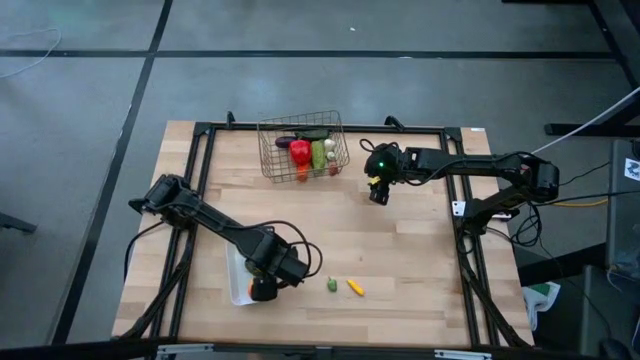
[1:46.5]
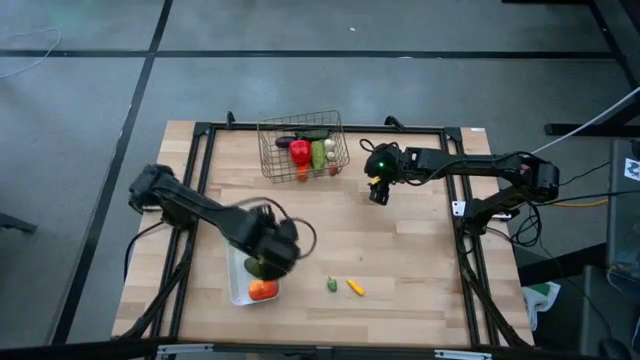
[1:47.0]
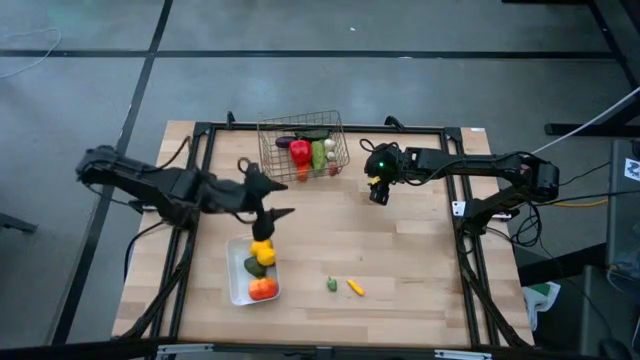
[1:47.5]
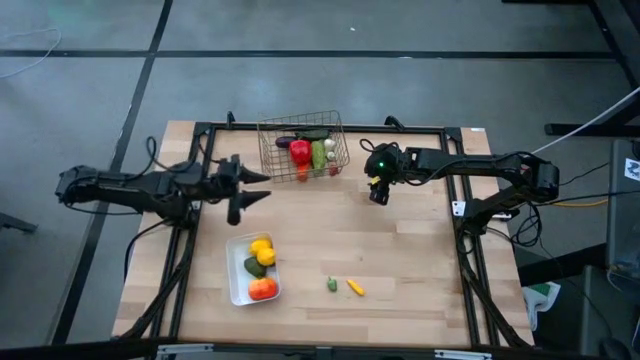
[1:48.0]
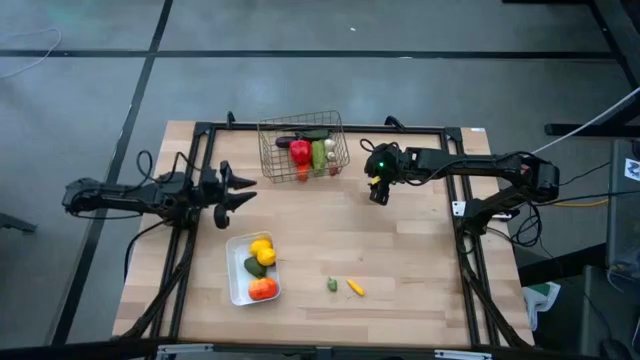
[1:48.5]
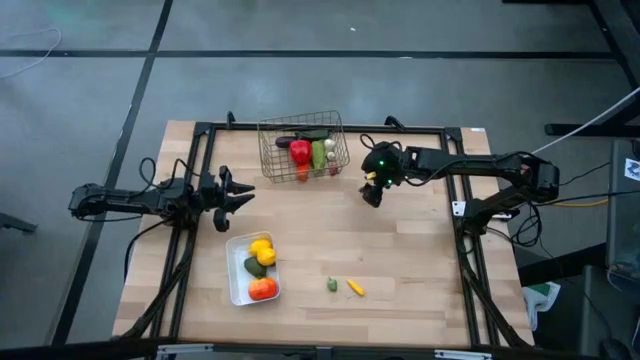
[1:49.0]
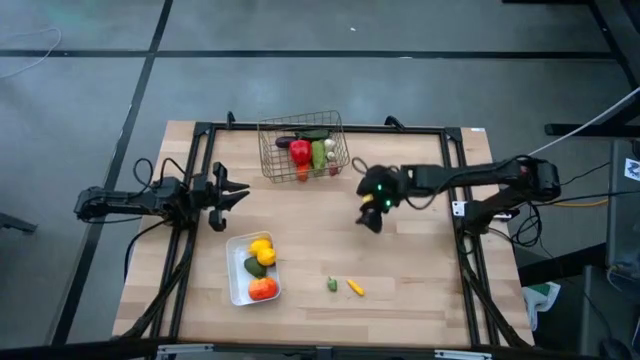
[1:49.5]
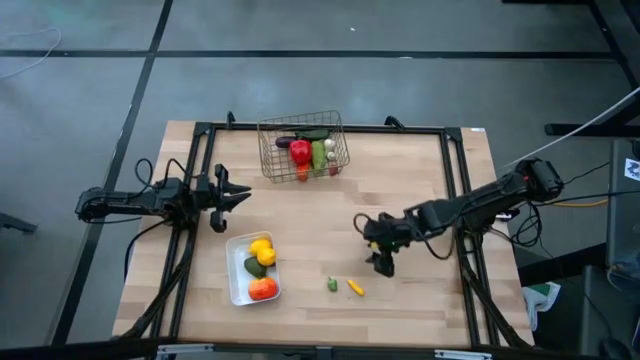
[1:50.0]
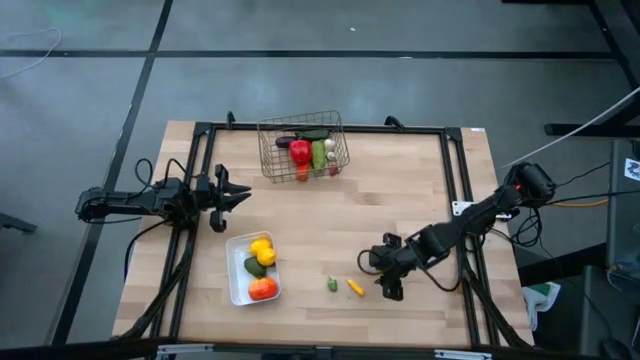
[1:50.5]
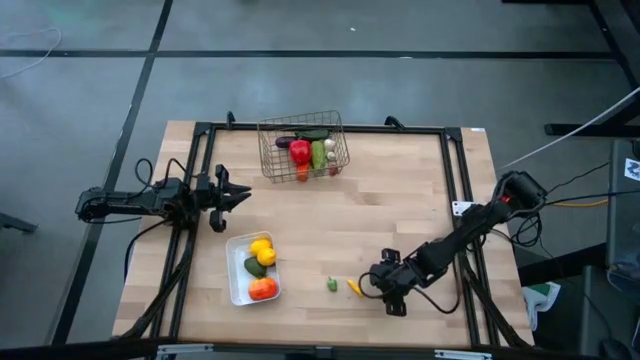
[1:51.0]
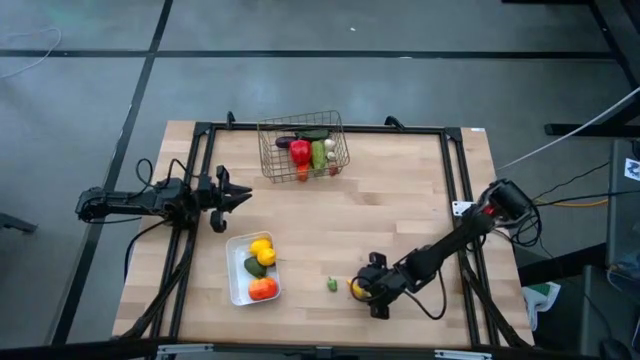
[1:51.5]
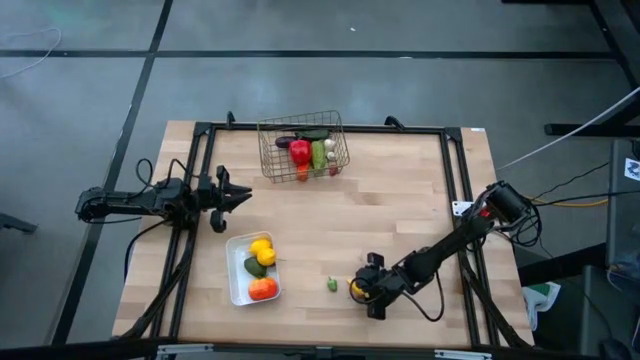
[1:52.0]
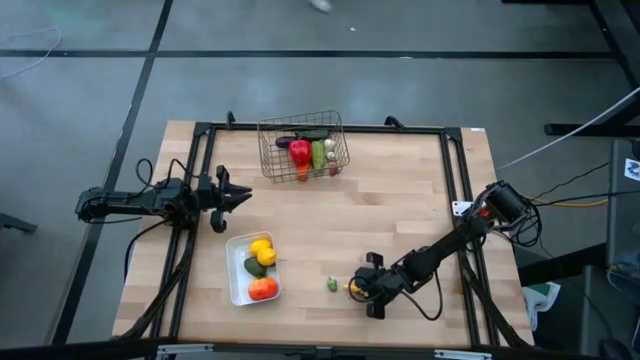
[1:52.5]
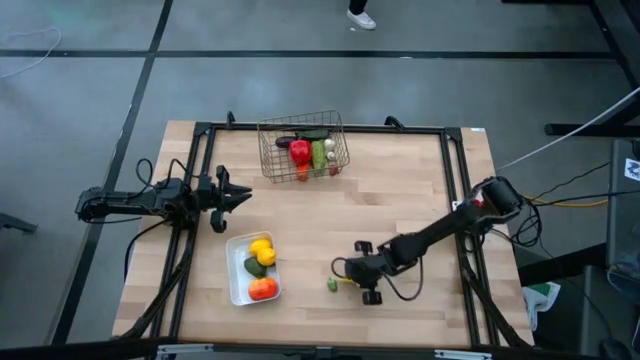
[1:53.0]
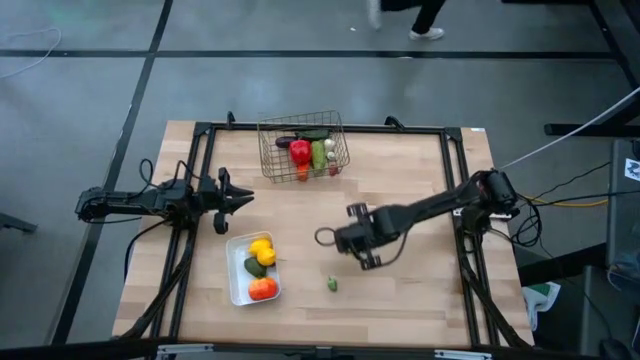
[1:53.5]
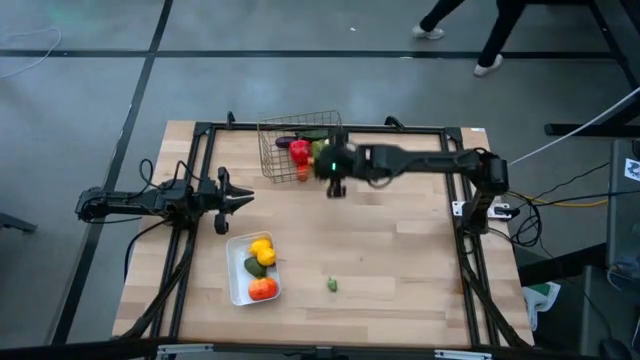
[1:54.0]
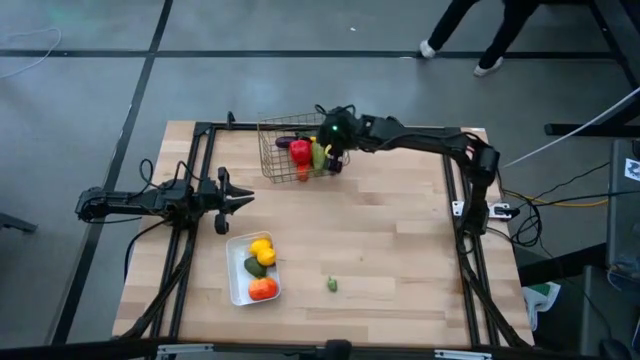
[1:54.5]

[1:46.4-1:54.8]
Task: Sort produce into baskets
Put the yellow corn into the gold wire basket

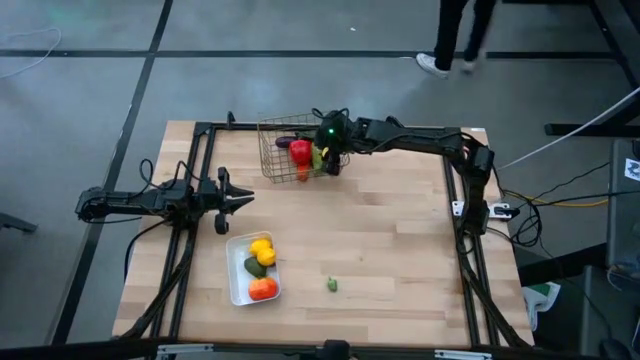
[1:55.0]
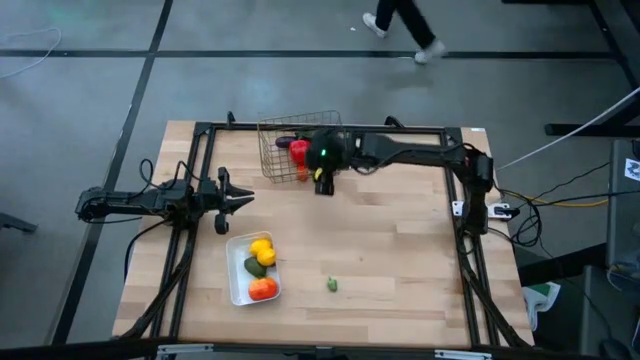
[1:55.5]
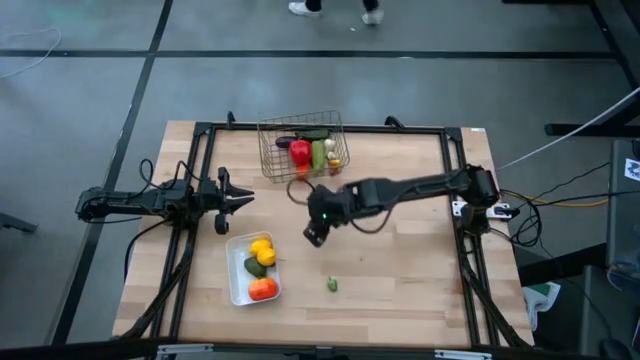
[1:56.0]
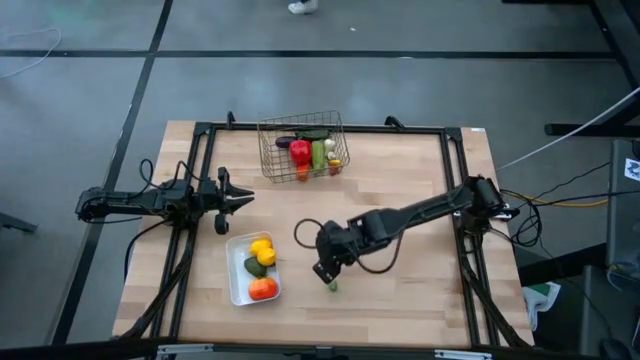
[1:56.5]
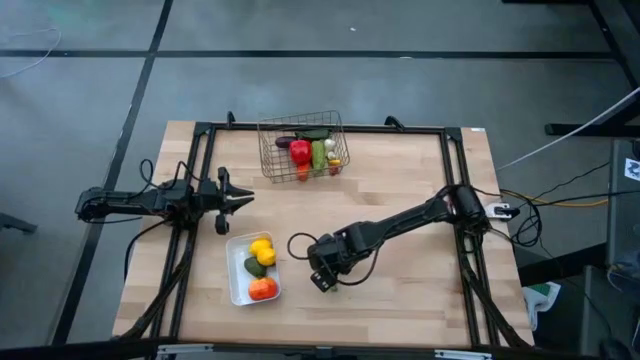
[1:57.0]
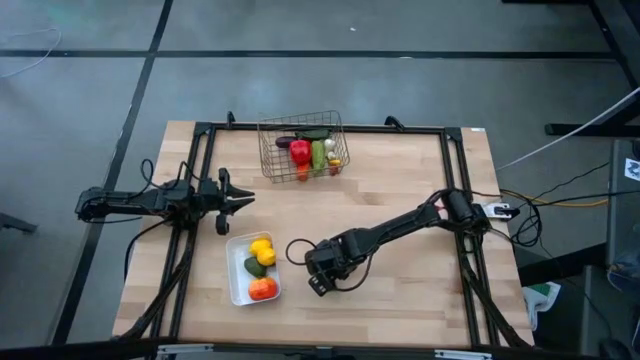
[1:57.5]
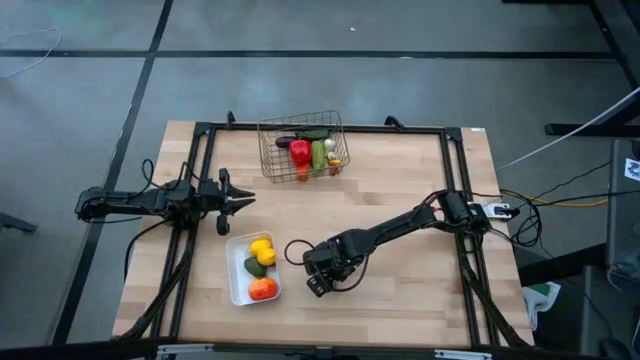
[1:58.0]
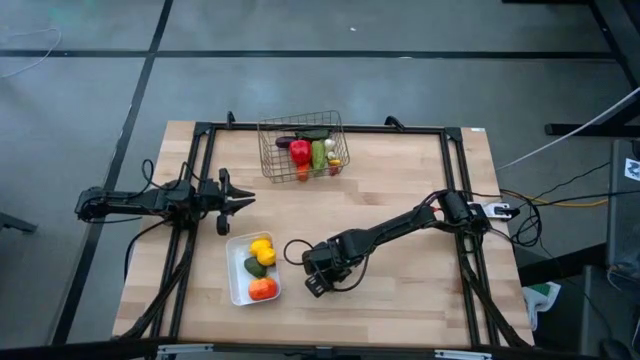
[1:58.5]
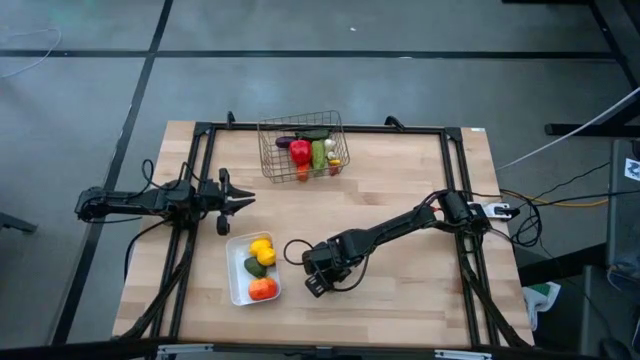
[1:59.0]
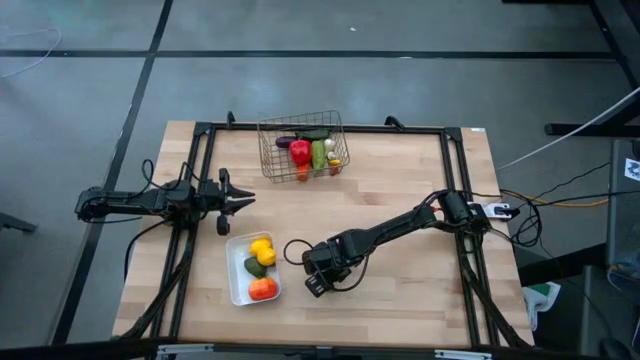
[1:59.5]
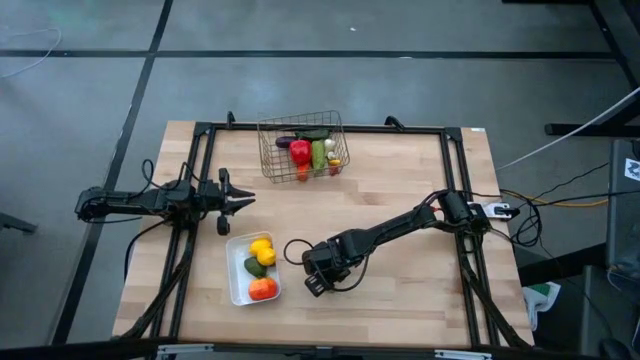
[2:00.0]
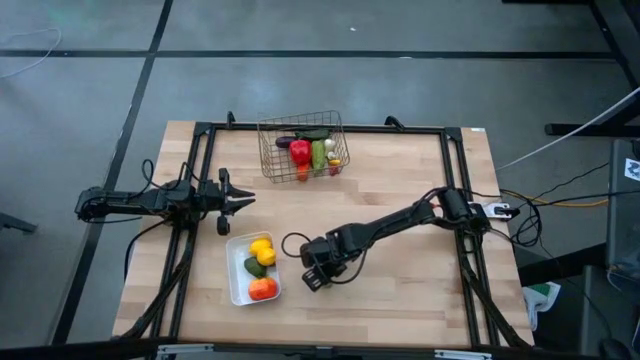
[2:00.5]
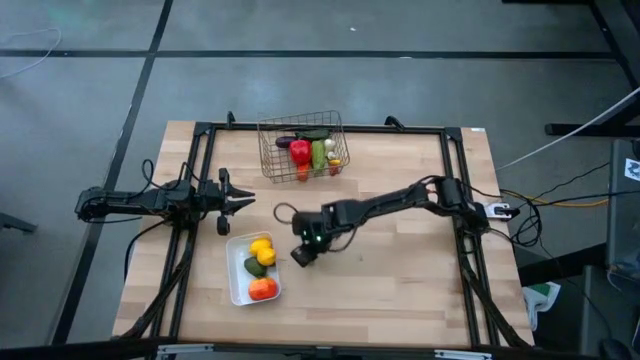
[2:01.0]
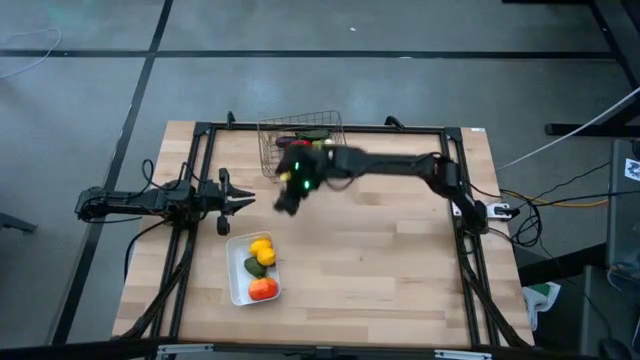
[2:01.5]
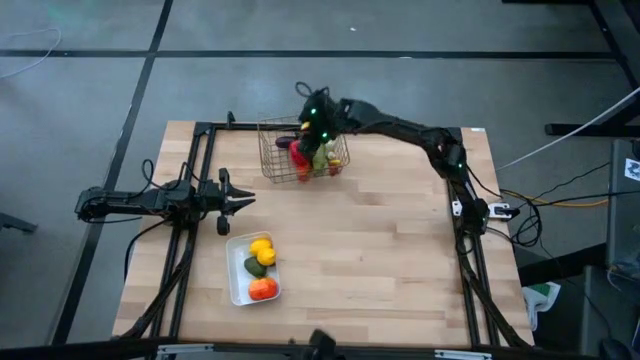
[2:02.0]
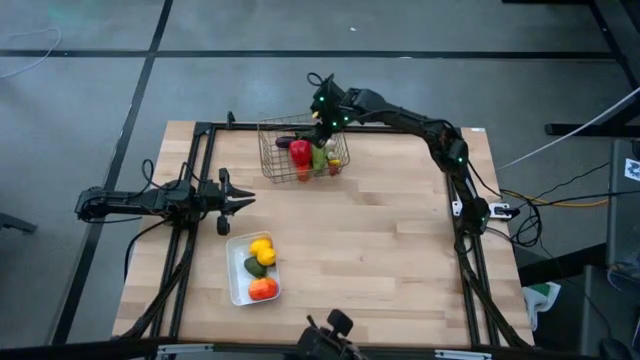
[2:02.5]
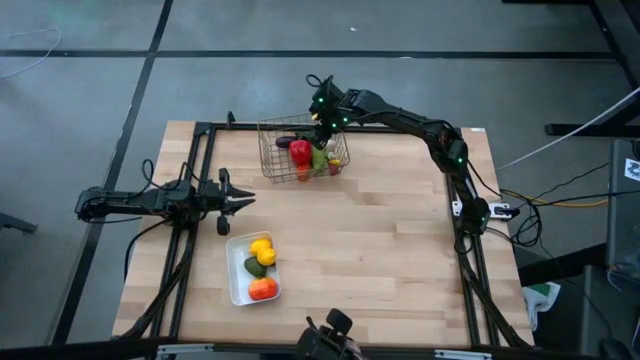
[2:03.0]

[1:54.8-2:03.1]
Put the green bell pepper into the gold wire basket

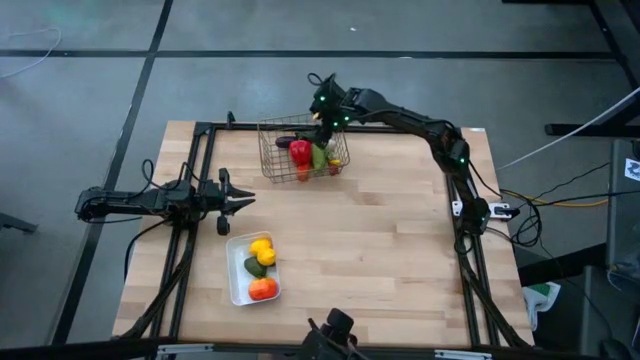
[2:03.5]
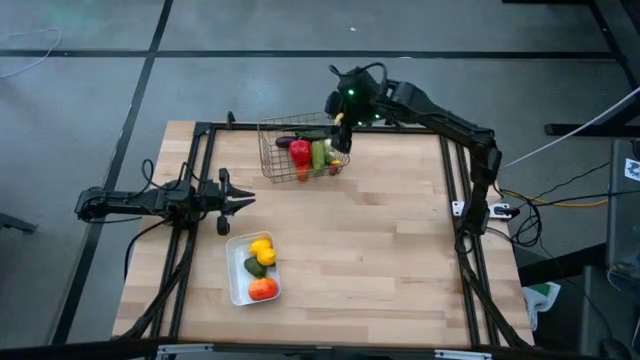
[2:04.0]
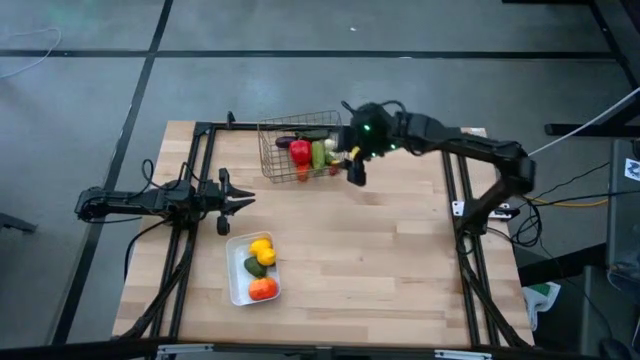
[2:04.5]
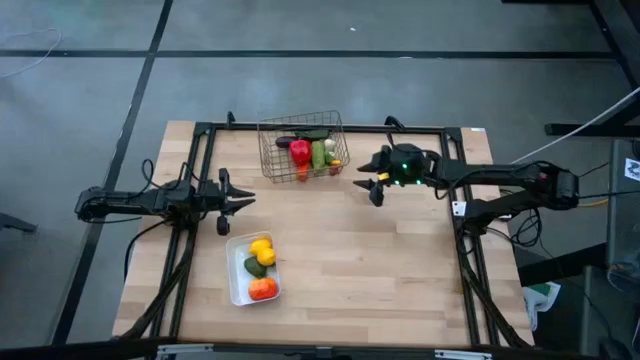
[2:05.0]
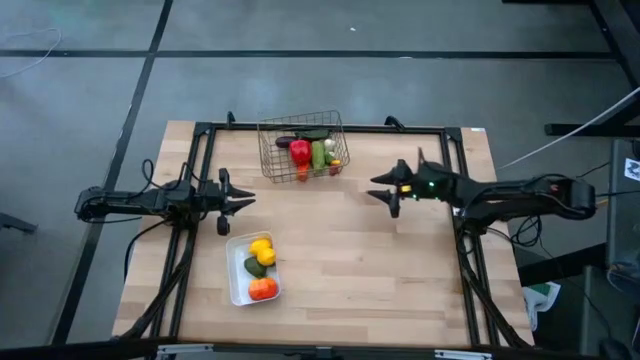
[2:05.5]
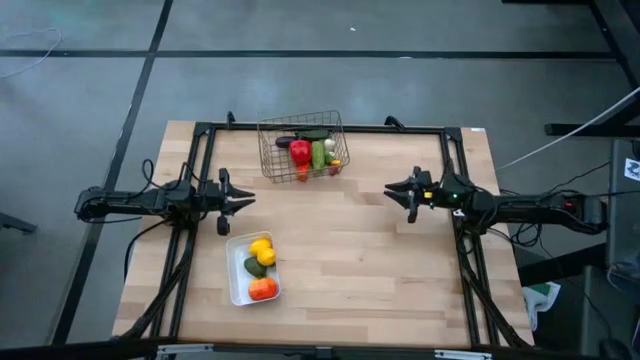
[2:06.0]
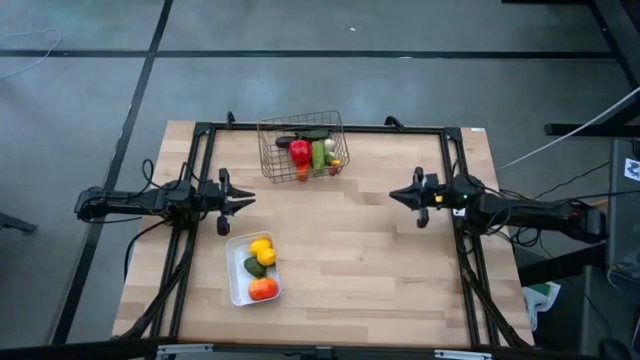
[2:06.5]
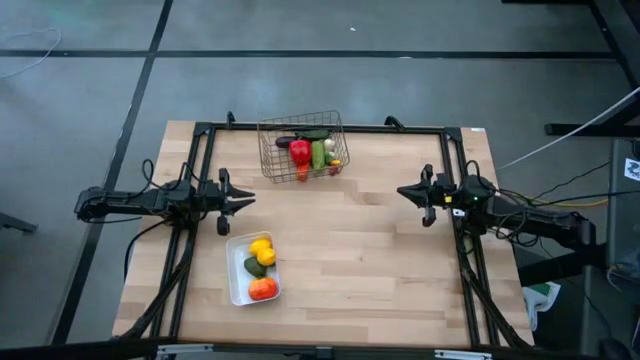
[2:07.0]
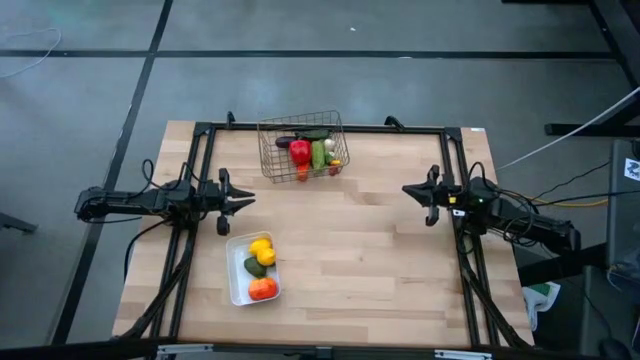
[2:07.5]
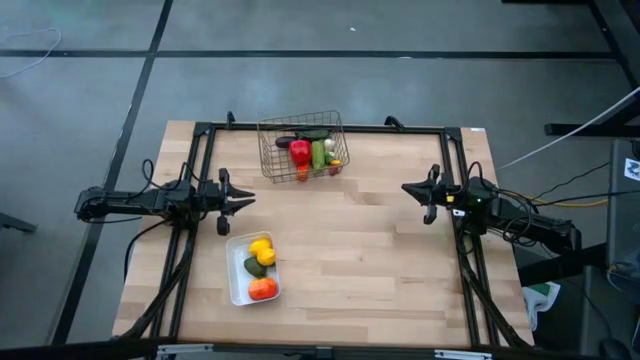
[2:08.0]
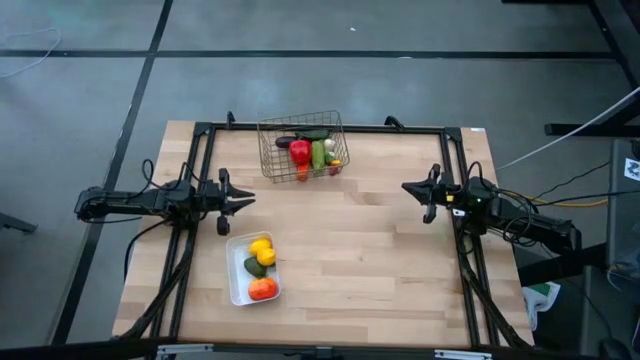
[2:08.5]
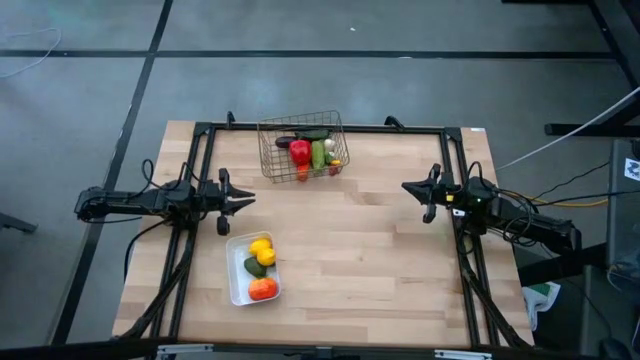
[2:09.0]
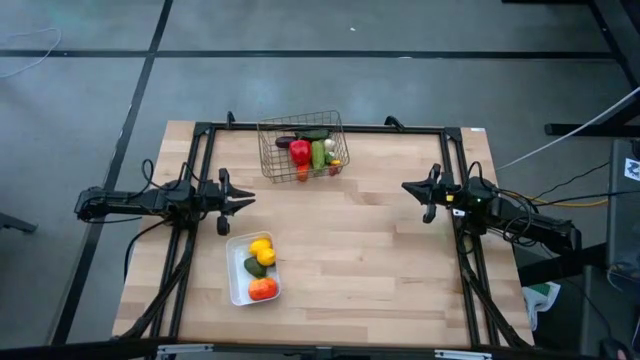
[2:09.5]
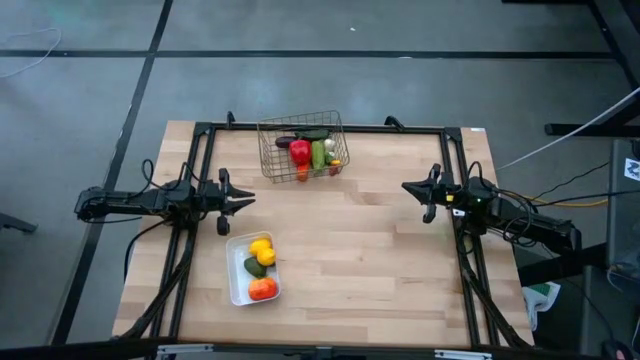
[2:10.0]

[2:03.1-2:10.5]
Return to Home Position
